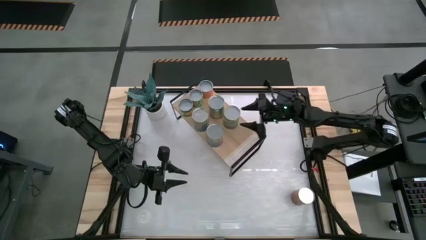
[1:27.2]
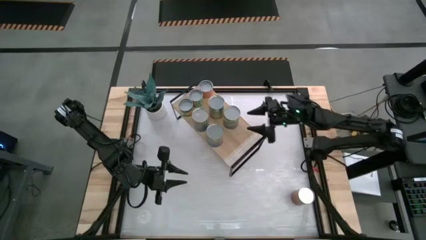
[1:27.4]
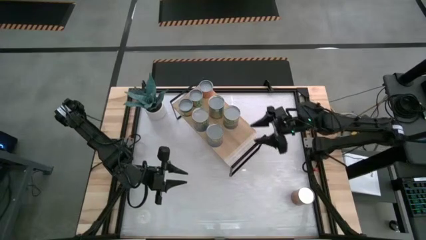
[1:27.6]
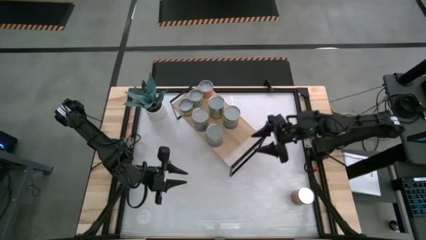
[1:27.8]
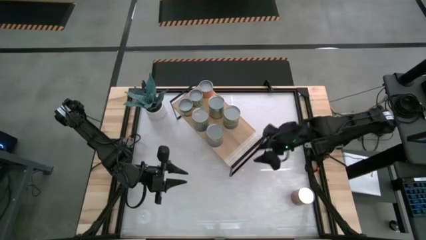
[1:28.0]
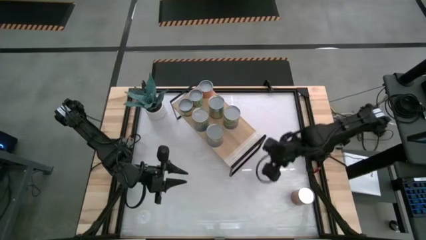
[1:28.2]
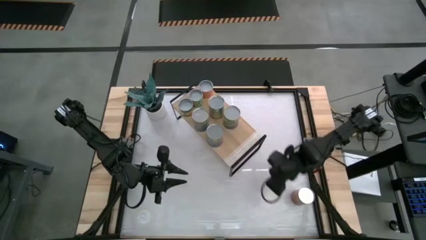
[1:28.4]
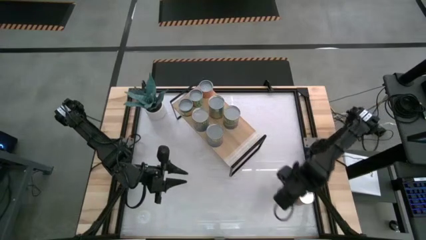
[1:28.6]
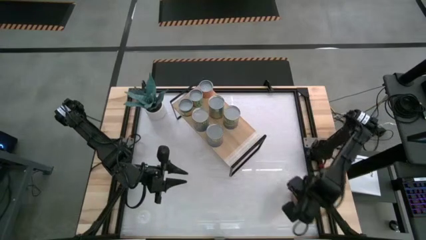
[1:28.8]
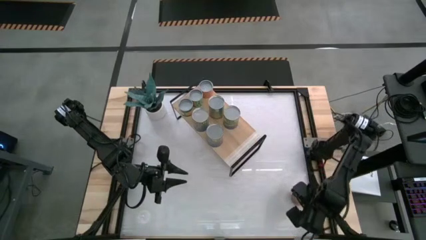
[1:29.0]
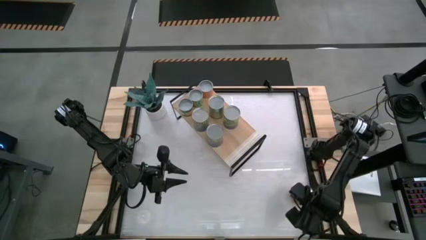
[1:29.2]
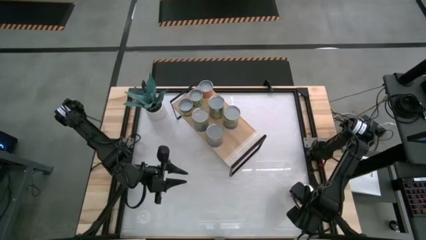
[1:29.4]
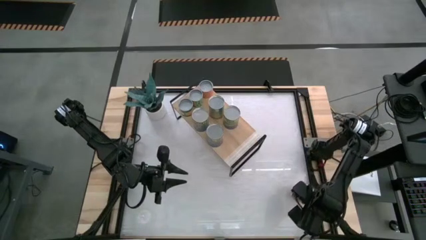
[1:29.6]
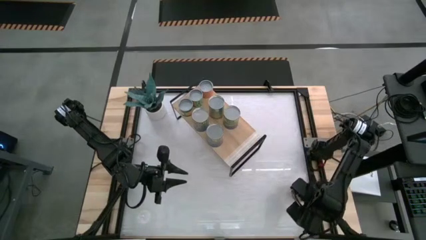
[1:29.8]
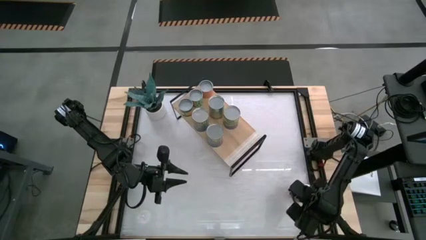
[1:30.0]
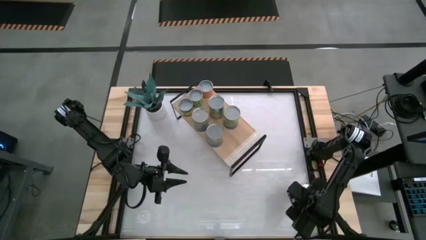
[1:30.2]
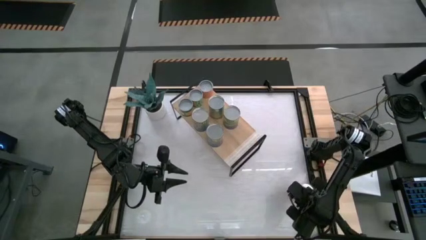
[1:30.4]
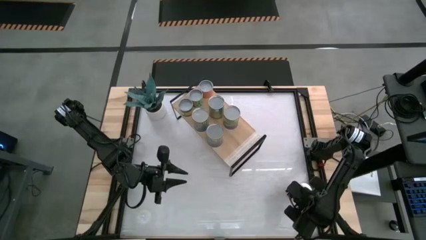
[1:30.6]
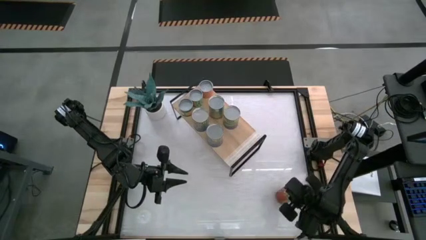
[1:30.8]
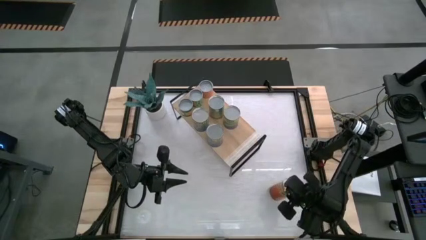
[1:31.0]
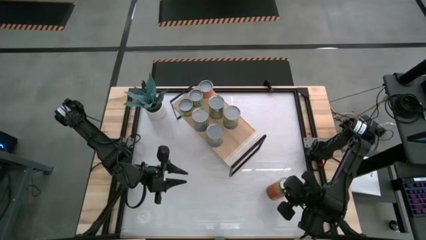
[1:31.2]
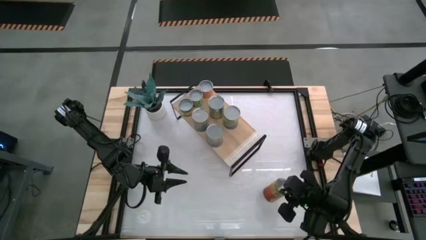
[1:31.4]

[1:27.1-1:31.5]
Task: Pick and place cans onto a shelf
Put the canned pineapple on the shelf

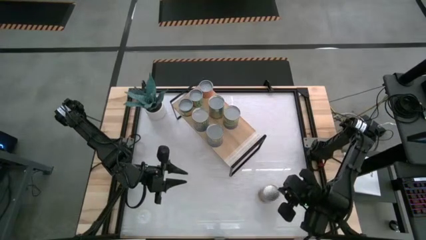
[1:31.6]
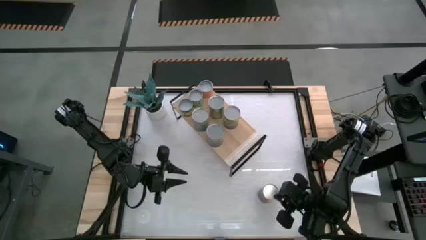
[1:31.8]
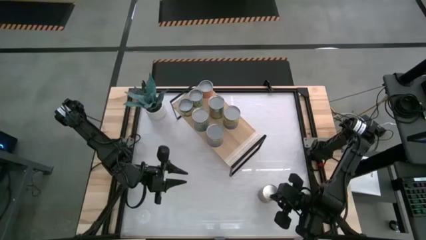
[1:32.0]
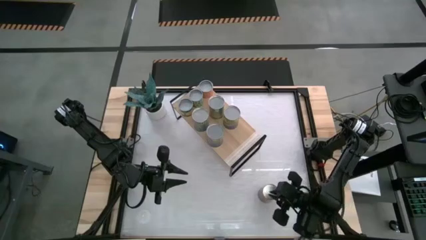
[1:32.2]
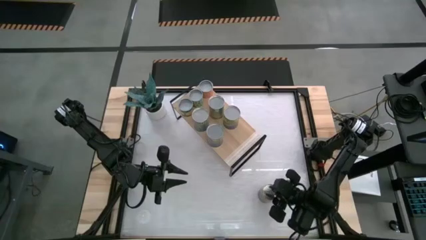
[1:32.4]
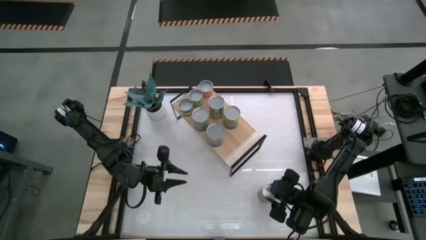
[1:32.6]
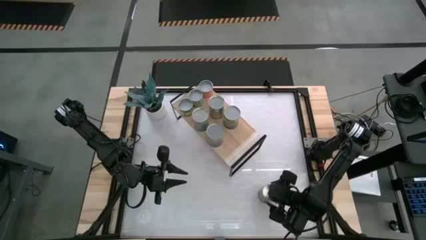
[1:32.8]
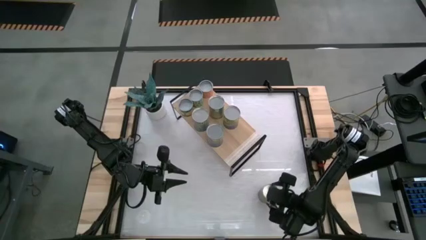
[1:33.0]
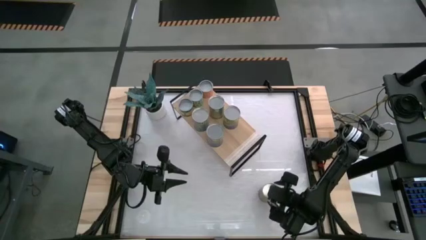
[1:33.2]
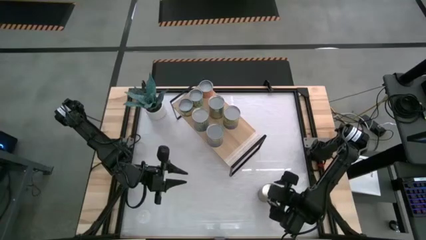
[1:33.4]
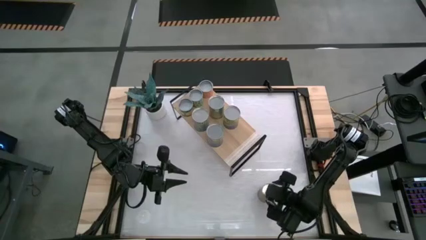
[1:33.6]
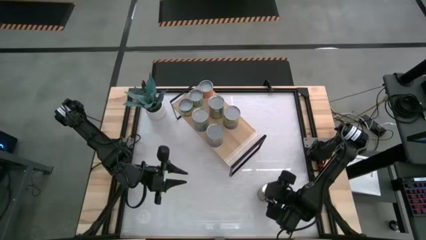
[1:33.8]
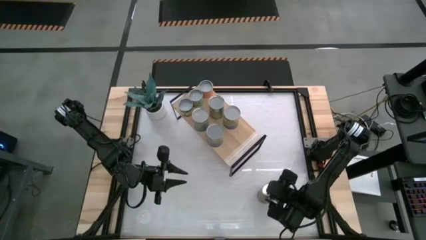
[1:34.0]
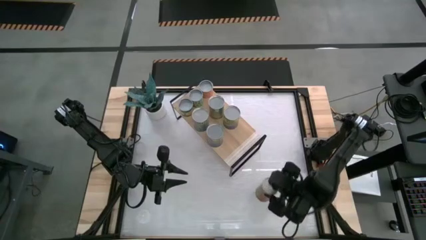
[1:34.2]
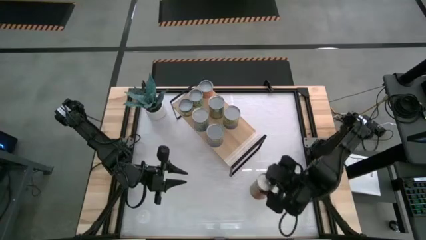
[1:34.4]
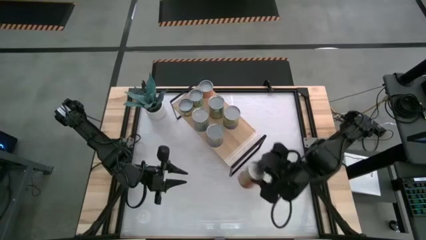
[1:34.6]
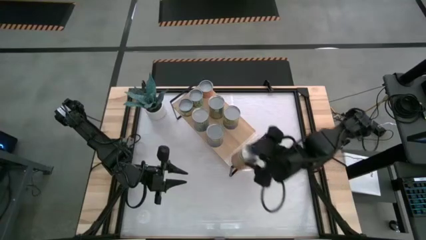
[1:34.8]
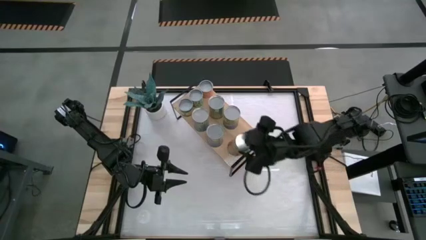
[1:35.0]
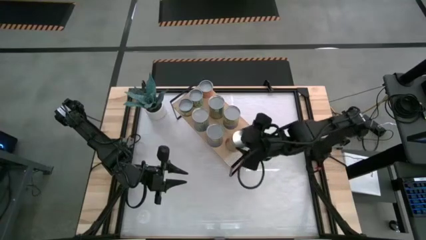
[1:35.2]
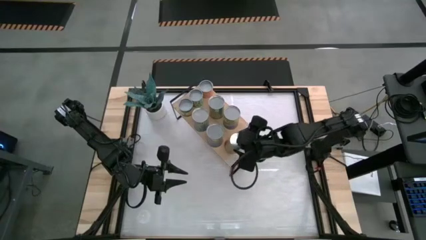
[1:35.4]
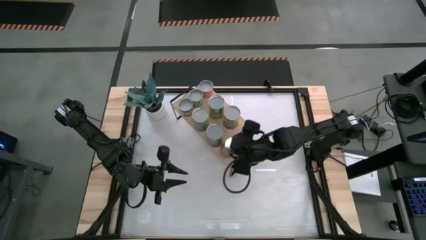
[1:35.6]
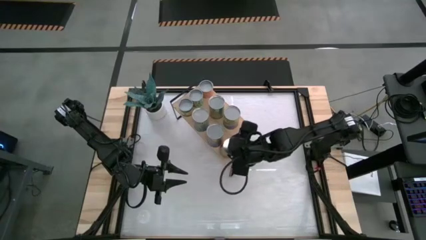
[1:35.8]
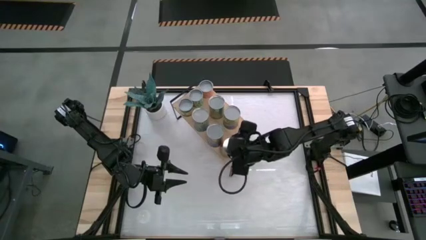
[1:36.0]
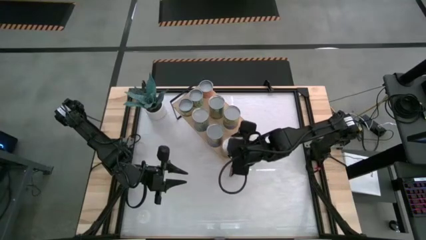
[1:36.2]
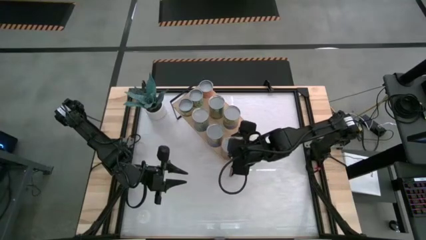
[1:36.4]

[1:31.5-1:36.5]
Put the canned pineapple on the shelf

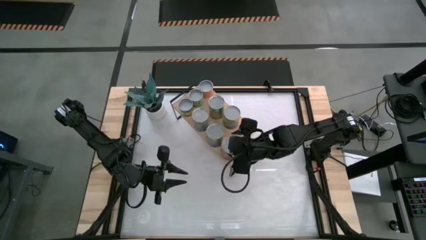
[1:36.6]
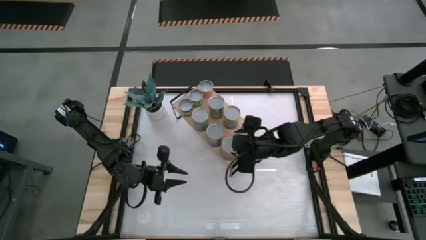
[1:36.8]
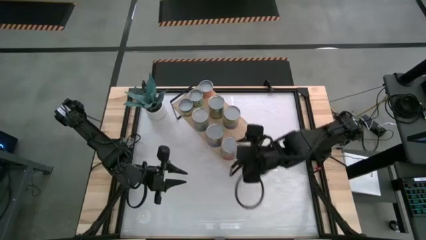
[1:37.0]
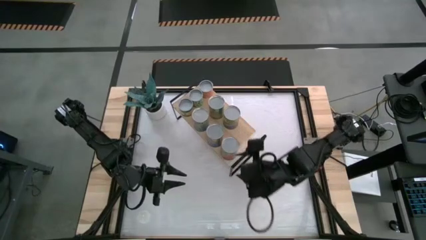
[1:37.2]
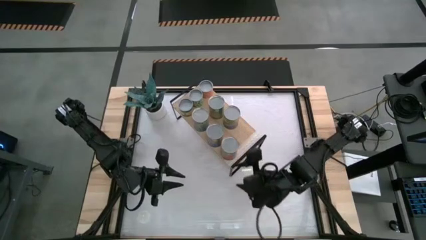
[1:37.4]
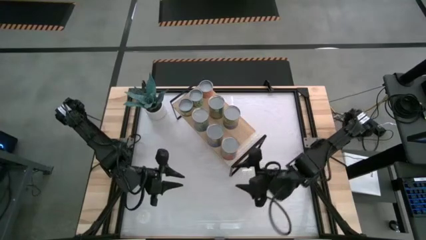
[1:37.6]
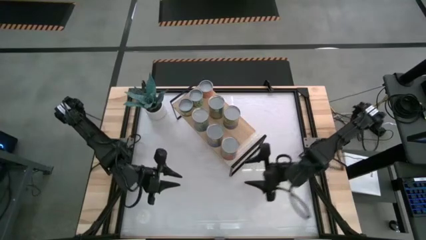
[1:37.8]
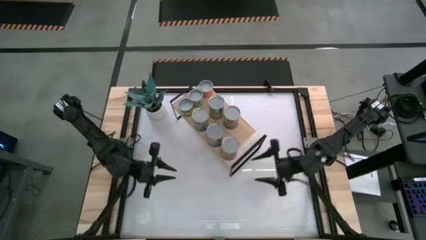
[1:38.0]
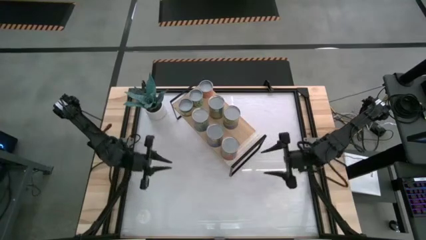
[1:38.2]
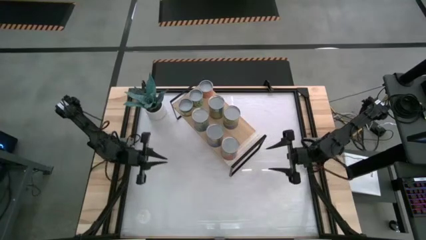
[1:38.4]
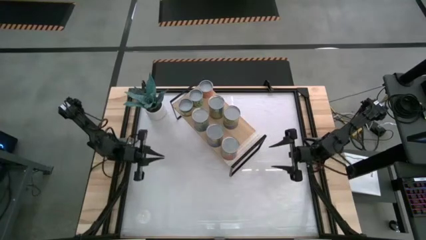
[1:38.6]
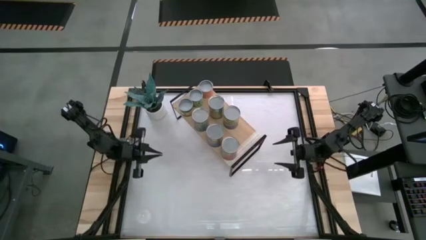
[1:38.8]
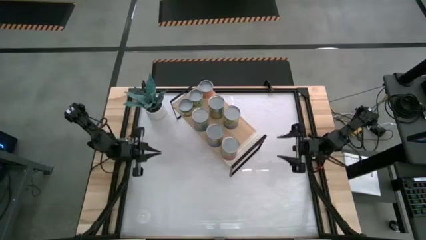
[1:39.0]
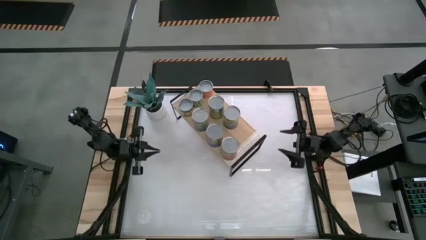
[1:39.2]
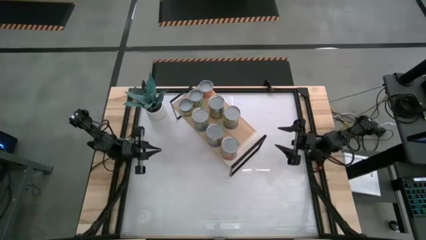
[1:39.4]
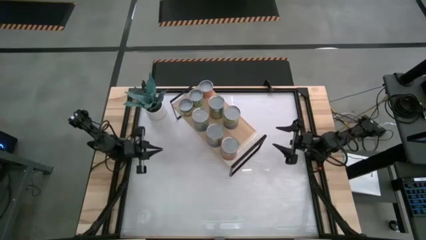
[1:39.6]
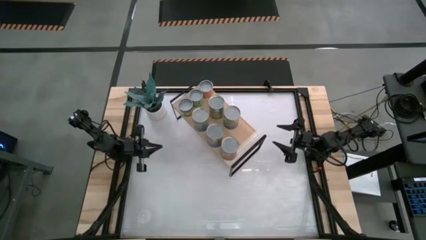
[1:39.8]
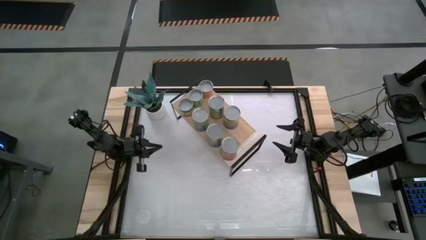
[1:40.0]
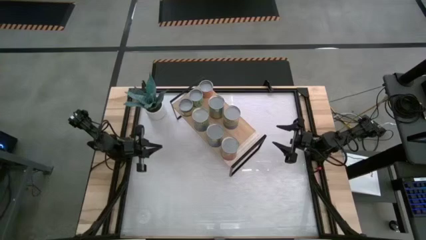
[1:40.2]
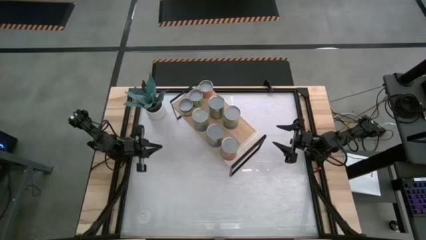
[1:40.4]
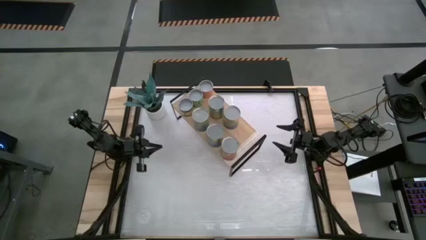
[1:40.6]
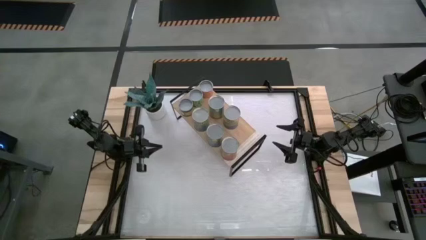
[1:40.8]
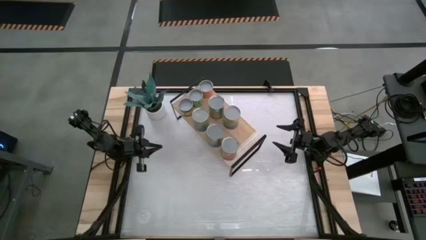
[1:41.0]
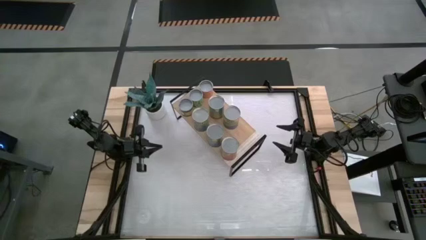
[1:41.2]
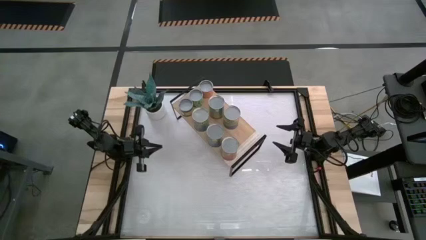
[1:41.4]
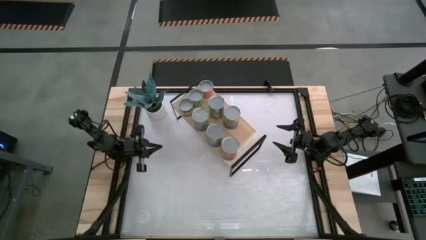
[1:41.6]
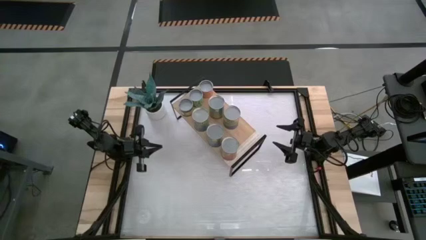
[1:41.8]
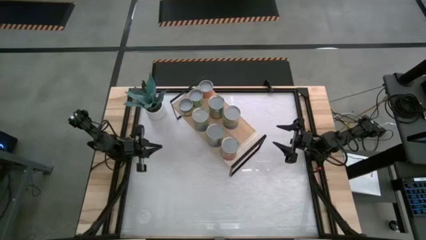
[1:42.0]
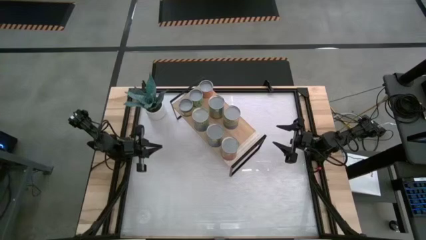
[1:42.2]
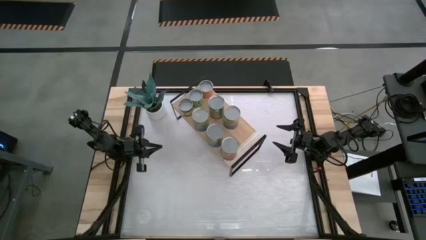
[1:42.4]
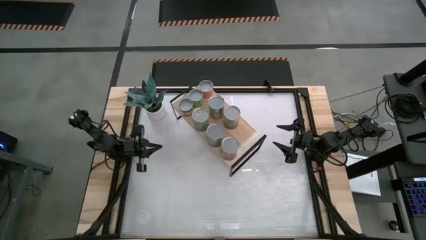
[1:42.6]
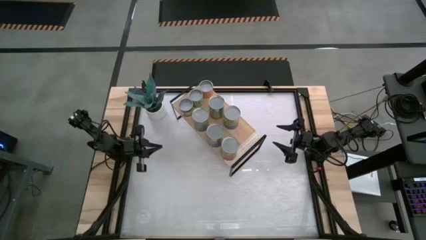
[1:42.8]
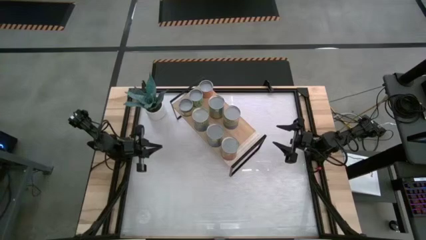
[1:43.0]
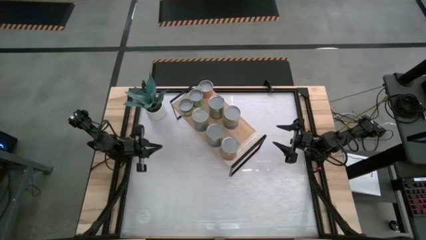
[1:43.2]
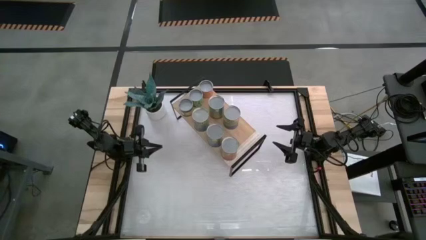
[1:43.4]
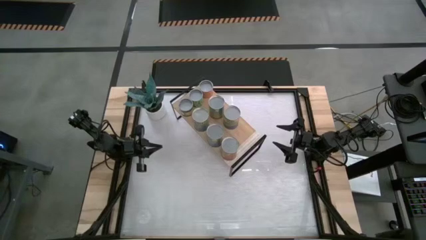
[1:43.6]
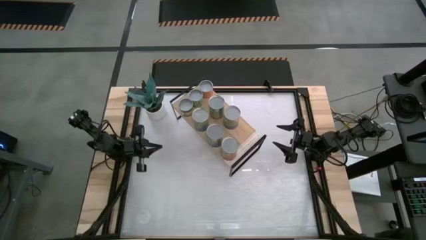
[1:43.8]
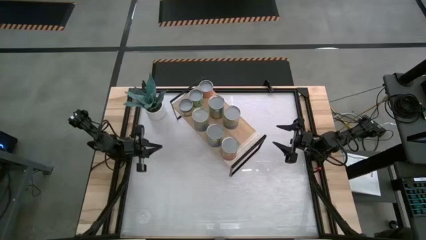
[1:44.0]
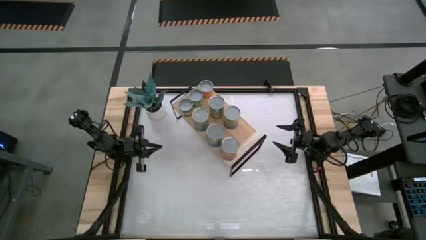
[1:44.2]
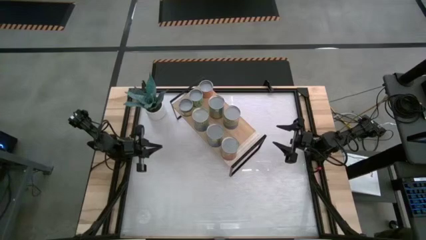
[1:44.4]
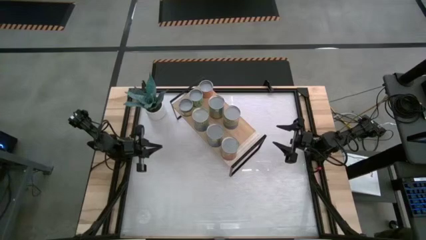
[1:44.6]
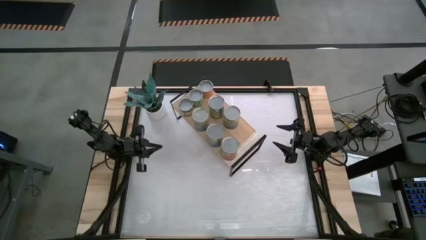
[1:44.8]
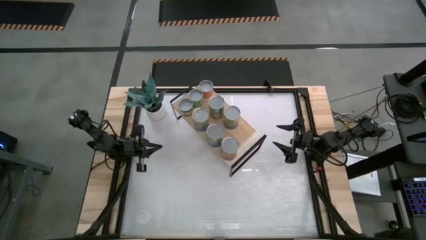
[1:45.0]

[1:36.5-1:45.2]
Return to Home Position
